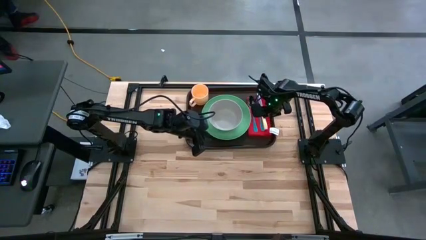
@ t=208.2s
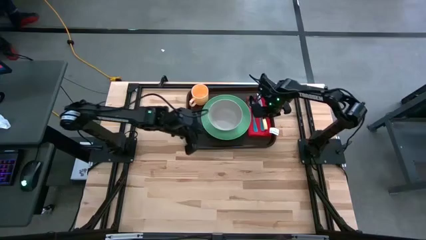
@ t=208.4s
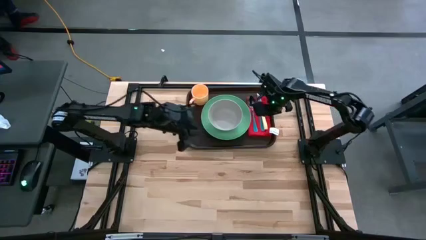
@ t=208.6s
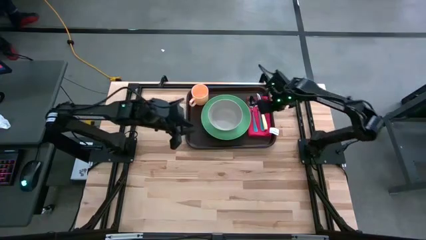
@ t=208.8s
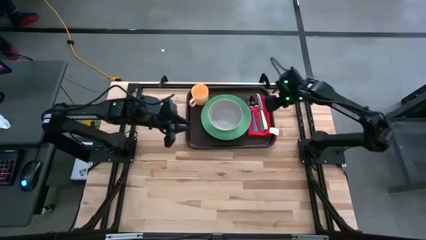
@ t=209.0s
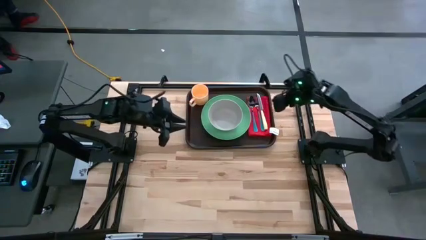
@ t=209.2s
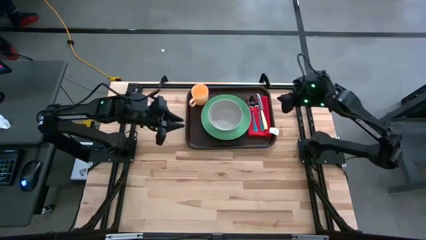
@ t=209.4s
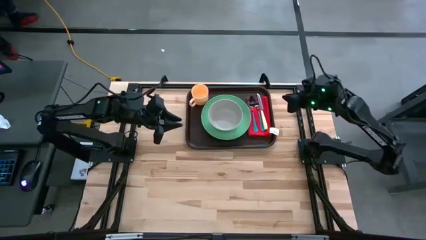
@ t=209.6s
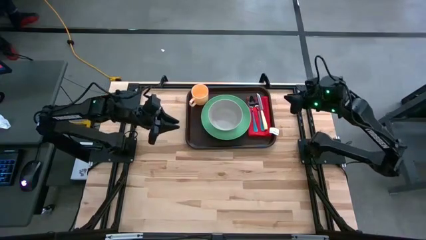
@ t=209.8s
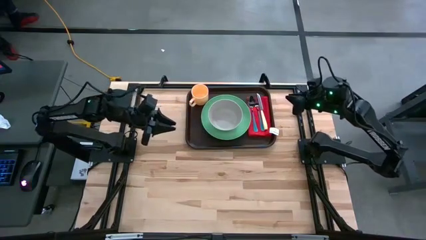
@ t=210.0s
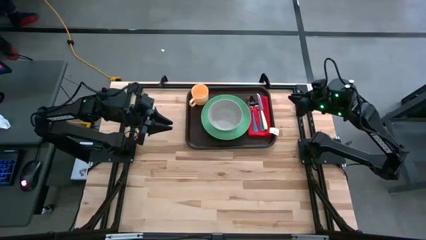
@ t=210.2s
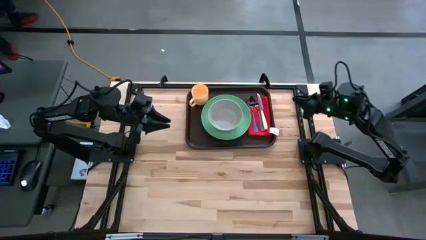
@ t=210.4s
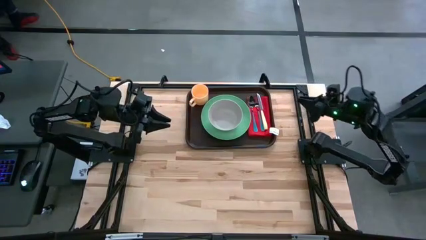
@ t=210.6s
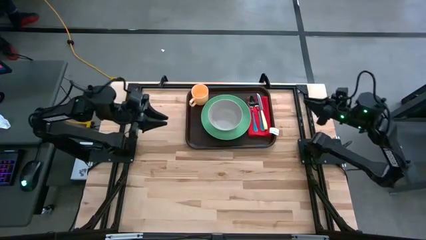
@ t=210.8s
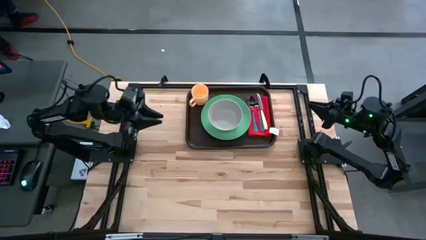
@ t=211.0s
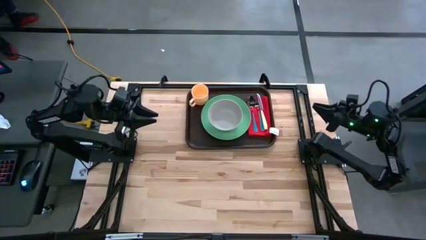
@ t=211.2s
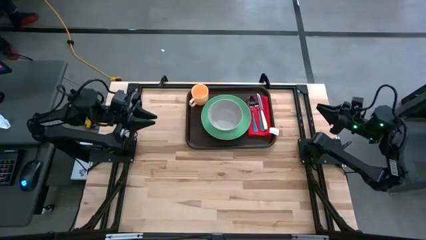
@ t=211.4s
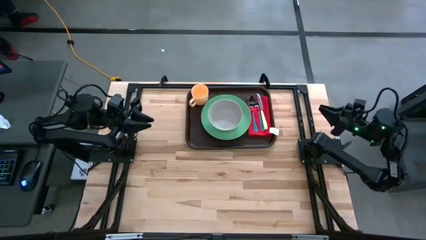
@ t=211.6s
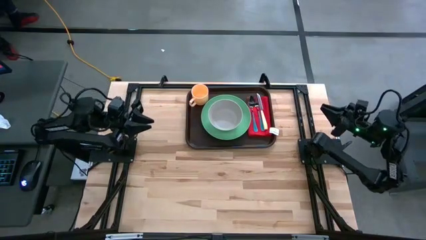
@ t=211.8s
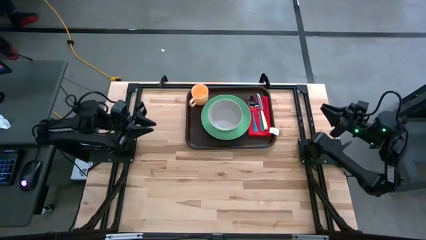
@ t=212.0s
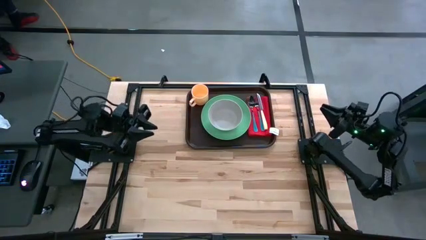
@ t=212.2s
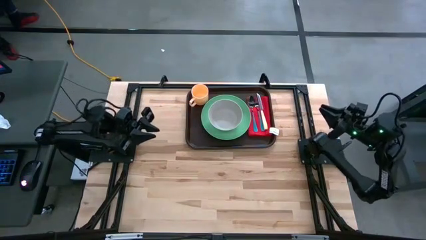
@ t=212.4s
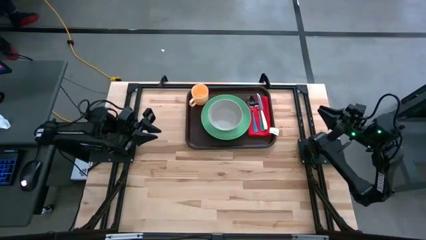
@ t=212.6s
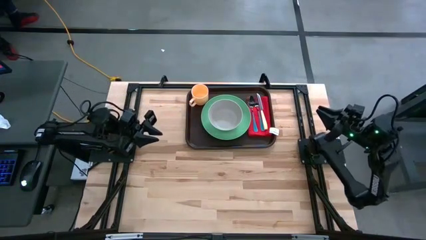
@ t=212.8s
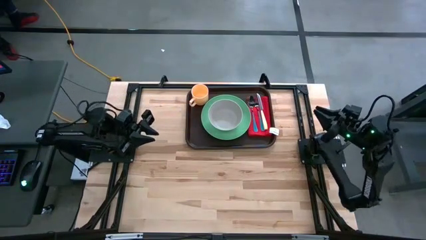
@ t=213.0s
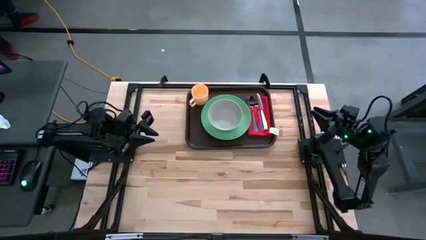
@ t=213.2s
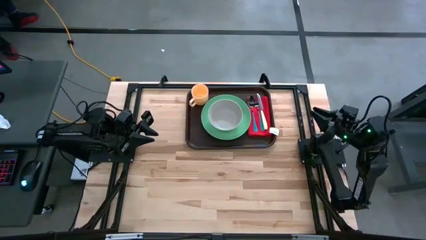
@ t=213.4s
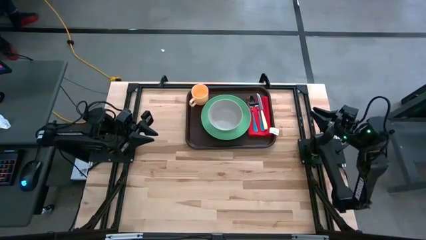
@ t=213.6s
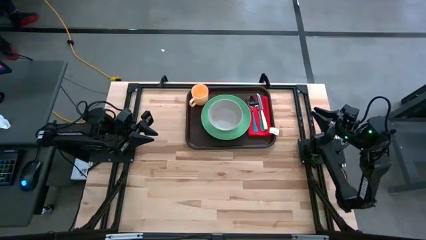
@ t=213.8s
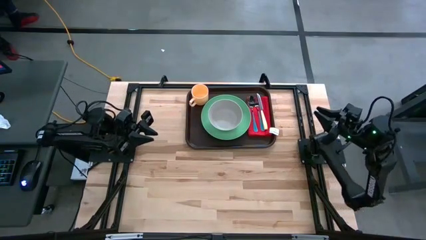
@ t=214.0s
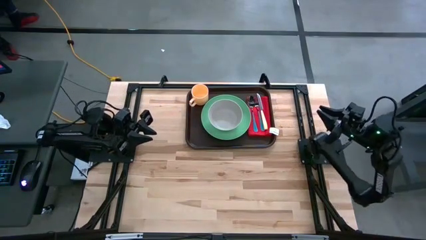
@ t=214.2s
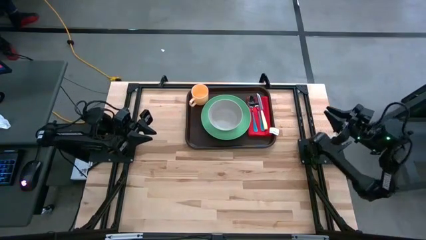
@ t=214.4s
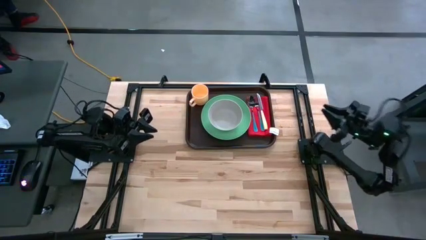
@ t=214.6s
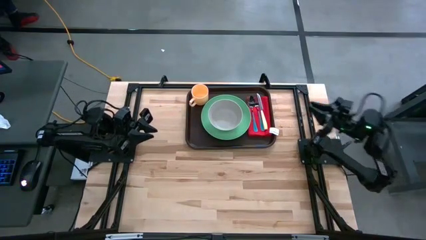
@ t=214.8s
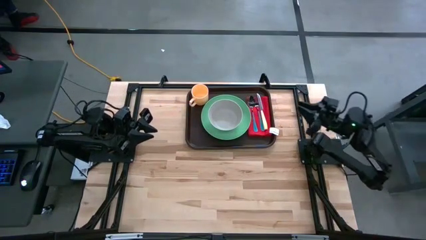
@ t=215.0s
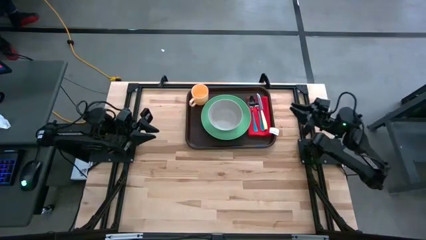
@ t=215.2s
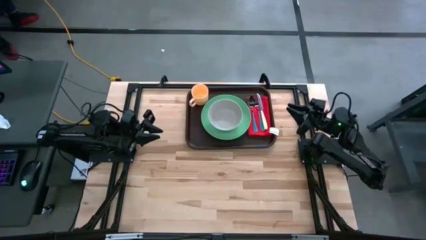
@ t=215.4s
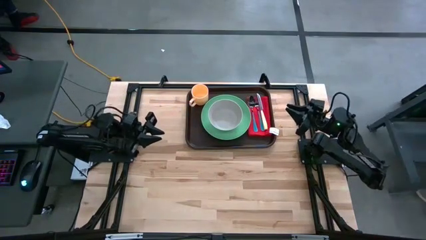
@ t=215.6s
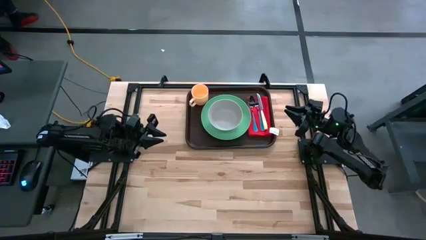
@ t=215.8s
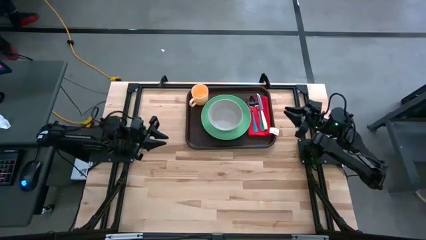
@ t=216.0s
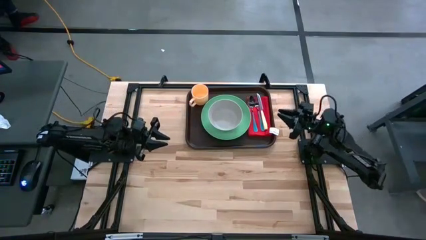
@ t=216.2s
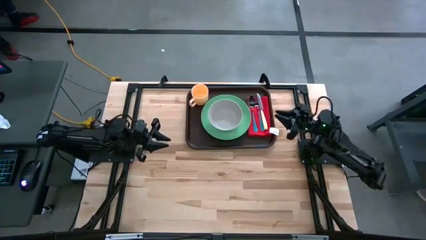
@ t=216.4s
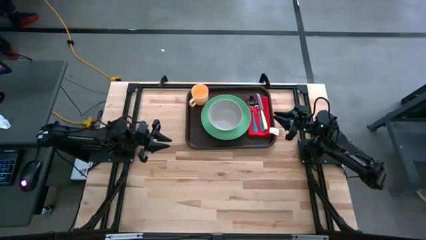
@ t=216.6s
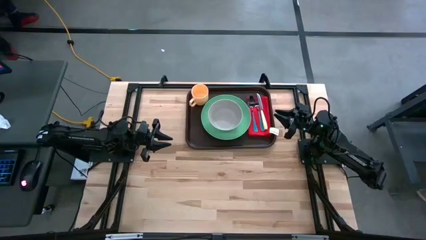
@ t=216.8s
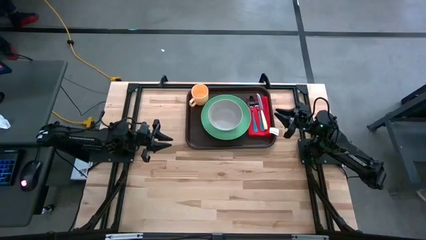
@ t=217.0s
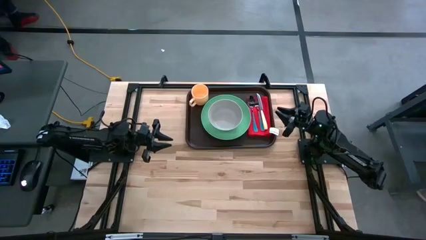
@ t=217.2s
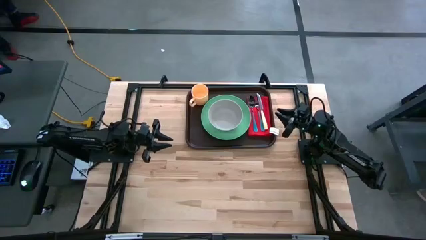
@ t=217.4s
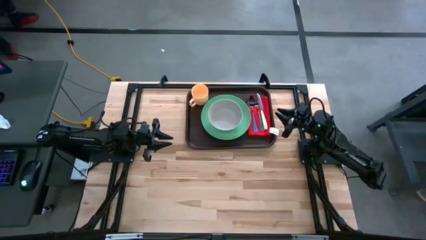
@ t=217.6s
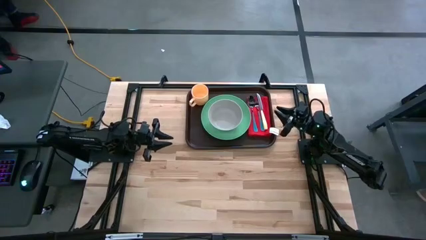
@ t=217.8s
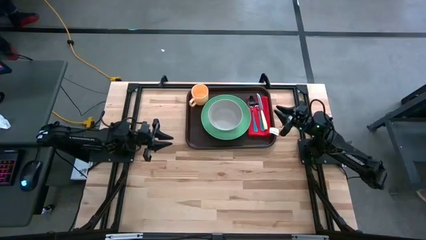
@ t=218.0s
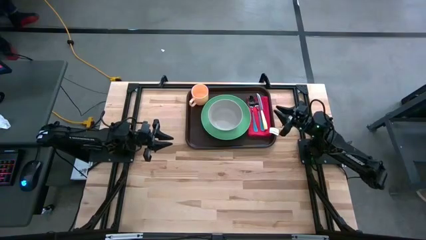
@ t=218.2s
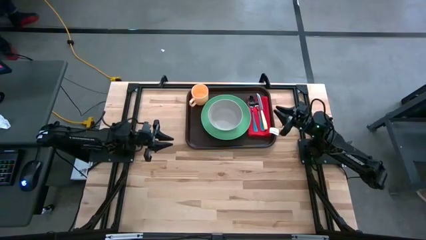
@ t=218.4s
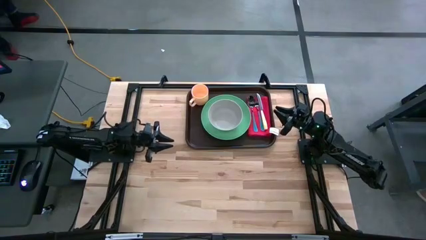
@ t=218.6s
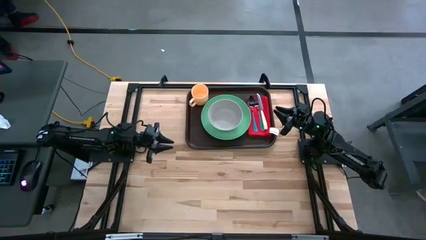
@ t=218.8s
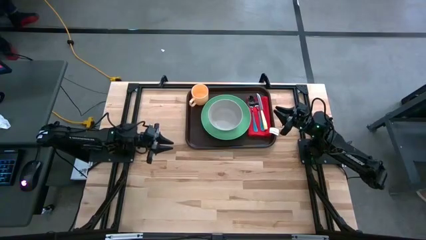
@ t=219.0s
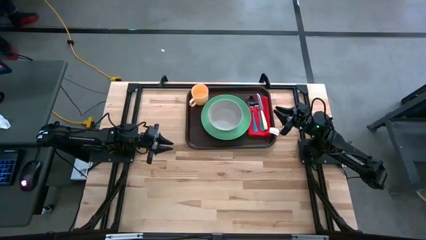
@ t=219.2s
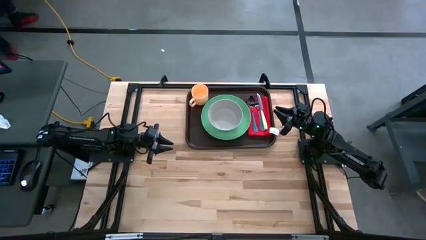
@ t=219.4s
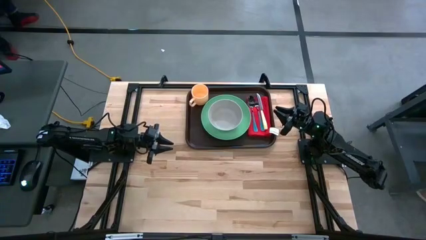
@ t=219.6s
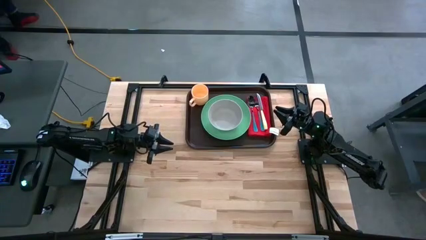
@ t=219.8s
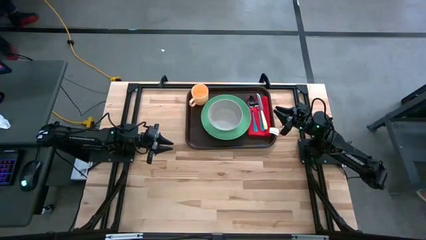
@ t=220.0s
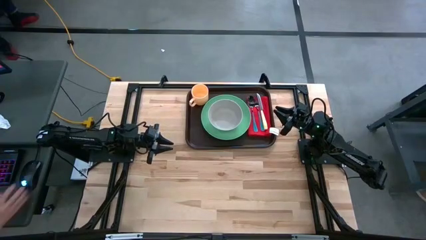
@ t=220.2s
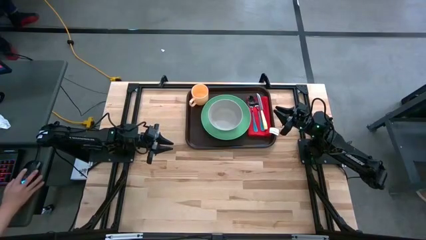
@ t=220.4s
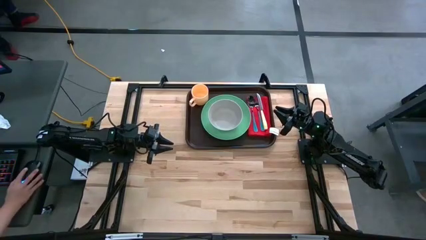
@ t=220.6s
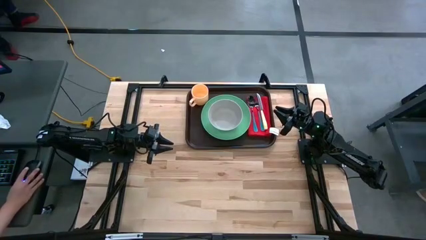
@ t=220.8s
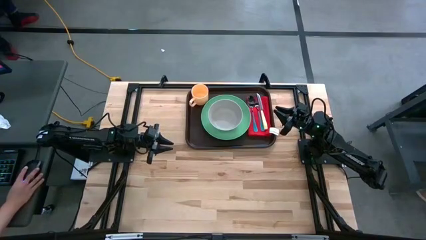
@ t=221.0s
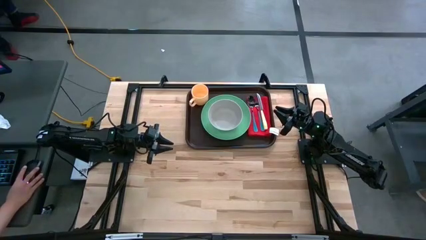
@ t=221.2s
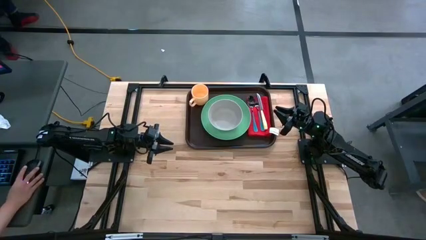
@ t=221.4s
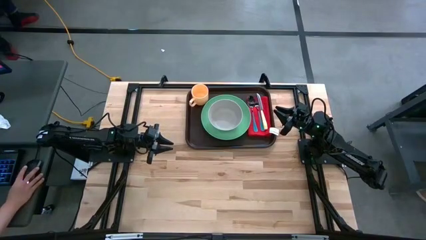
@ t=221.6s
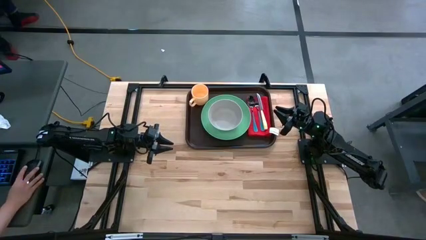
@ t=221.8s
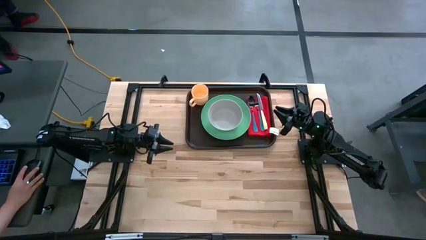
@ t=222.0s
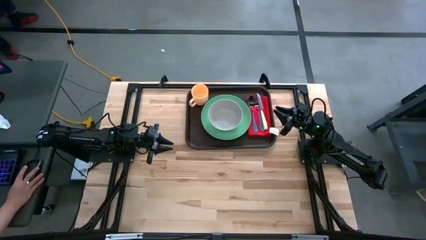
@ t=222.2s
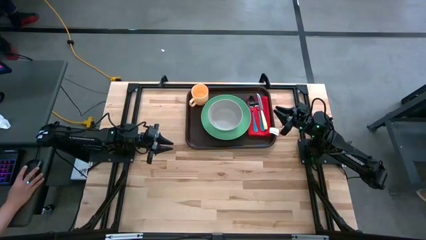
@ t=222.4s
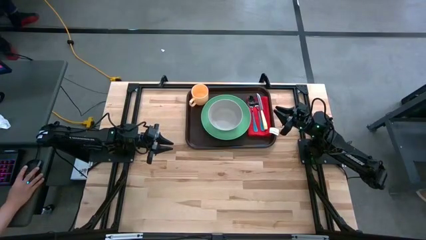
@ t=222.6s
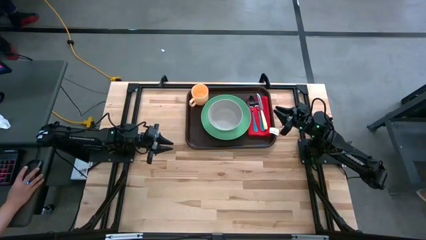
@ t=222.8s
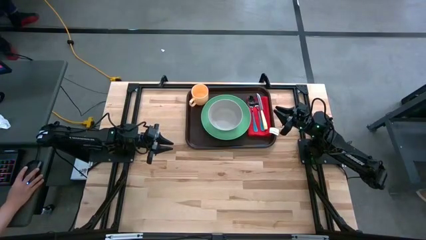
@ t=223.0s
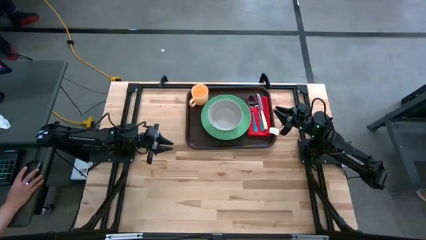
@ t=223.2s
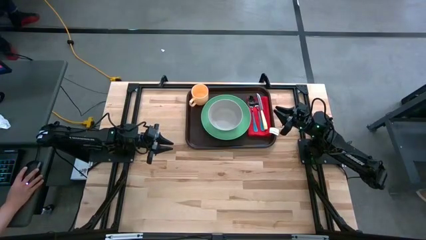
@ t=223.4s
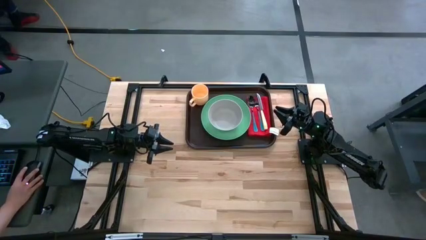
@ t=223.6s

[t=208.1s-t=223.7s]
Task: Set up tray
Return to Home Position
